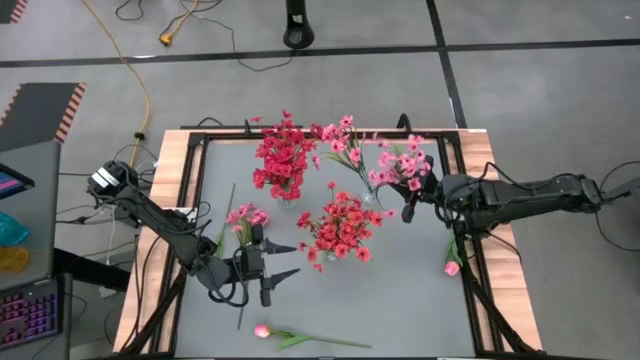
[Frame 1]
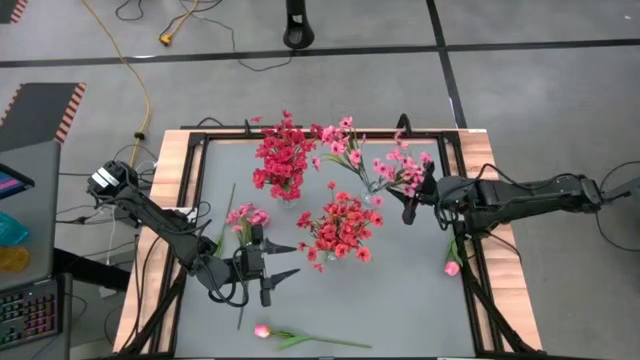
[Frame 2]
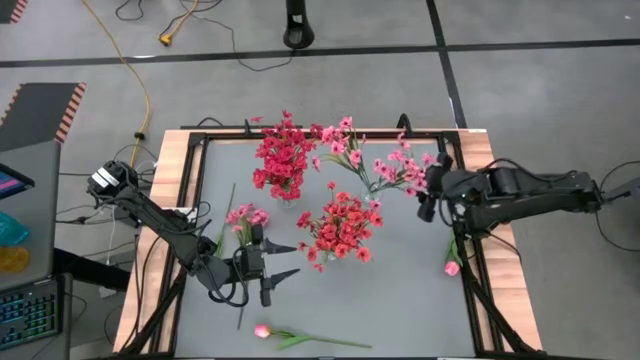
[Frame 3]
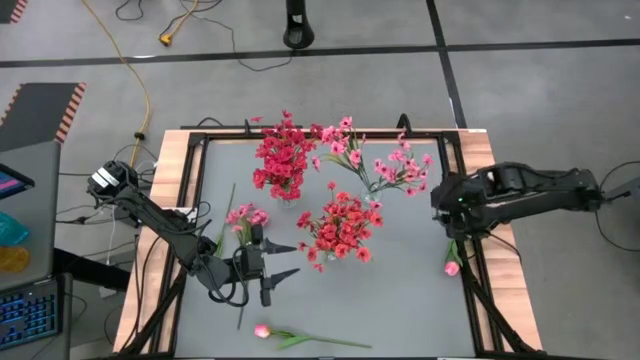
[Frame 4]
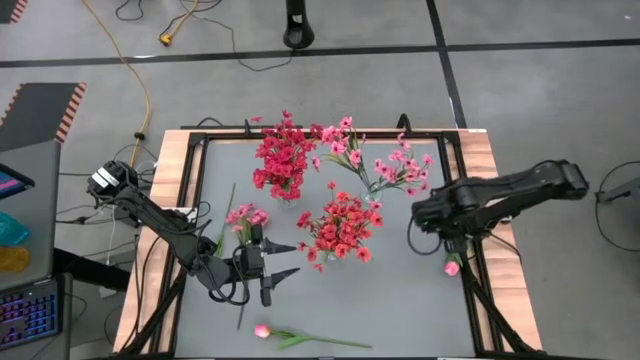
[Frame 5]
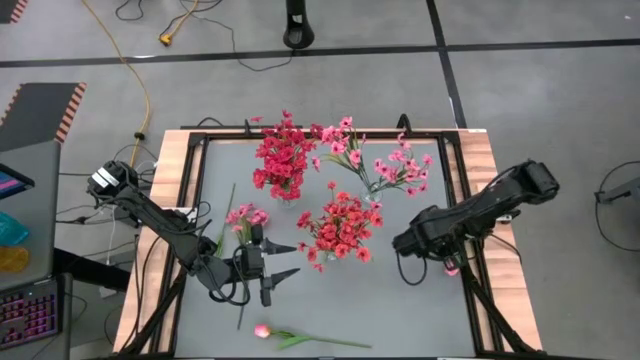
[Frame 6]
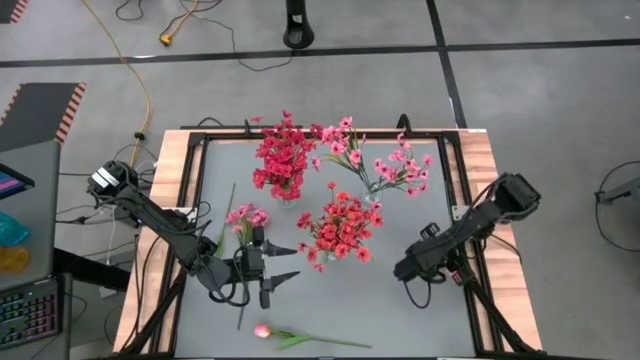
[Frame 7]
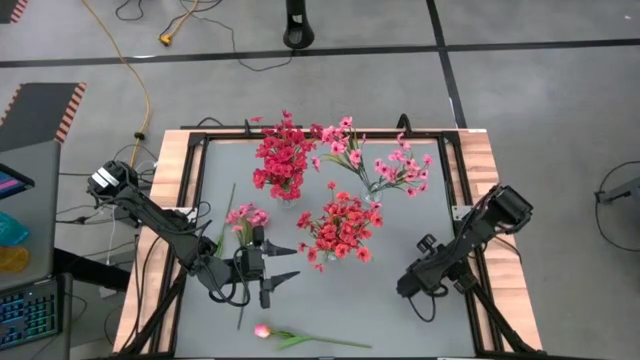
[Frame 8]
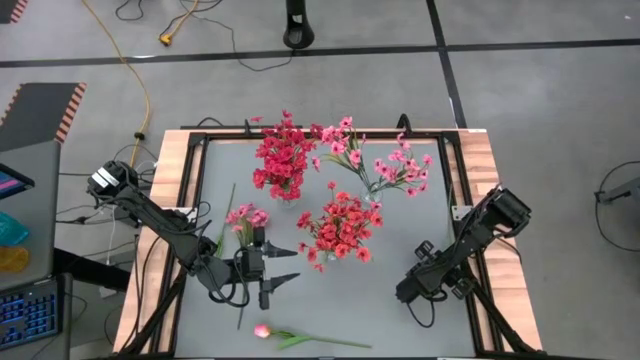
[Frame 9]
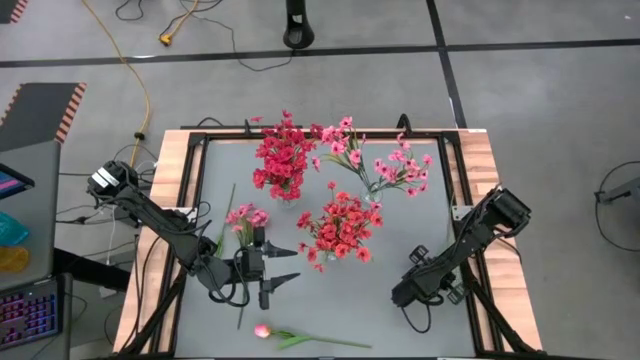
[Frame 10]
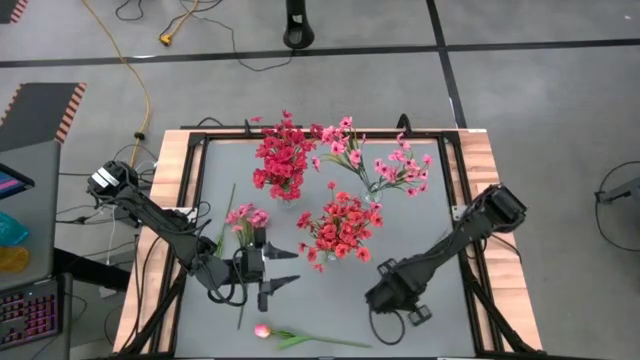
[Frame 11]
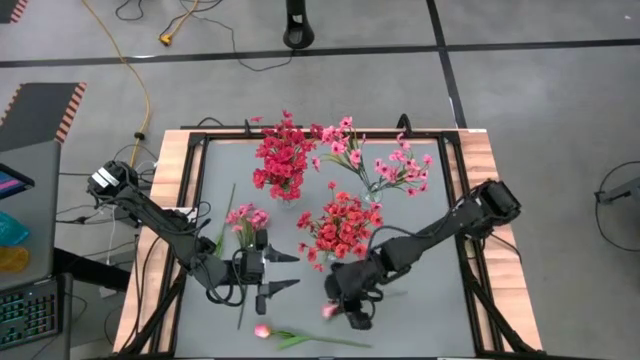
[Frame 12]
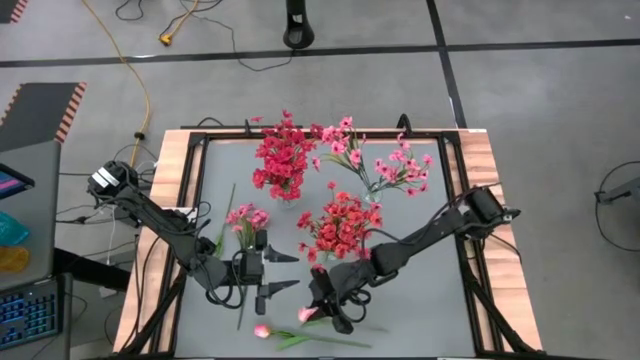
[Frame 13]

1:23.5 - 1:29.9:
Task: Sort flowers into vase by color
Move the pink flowers onto the bottom center table

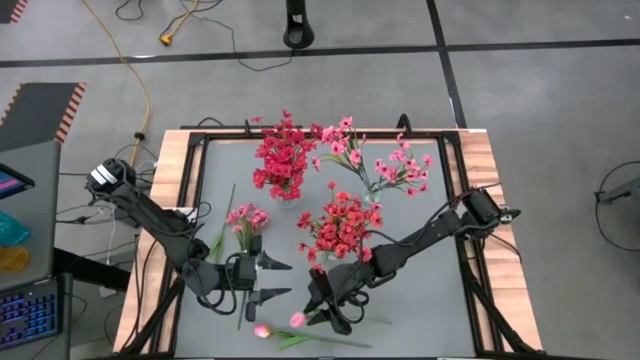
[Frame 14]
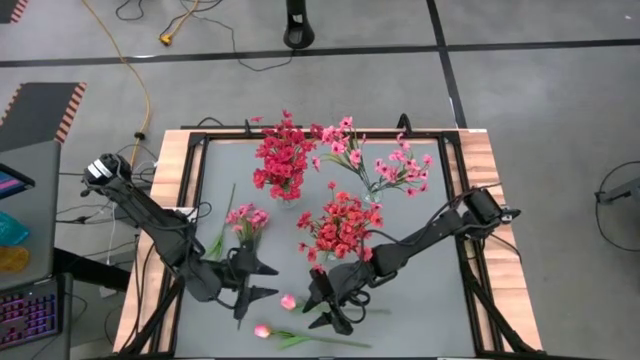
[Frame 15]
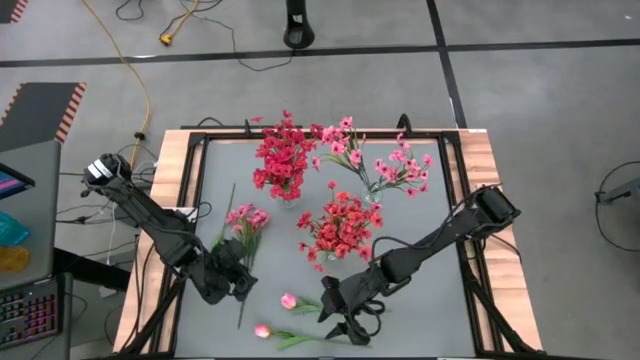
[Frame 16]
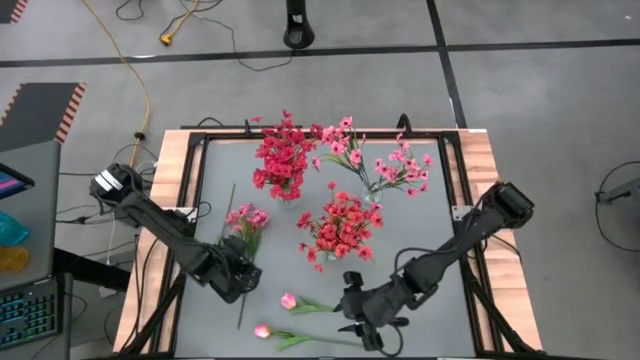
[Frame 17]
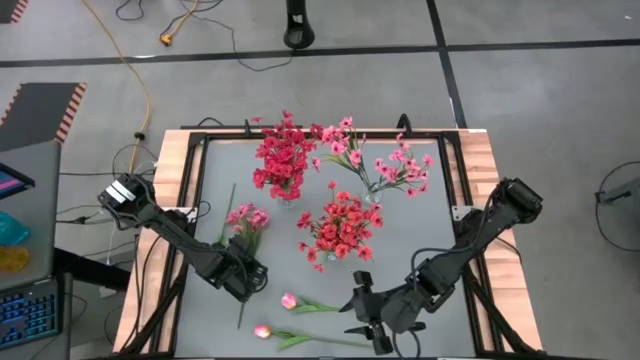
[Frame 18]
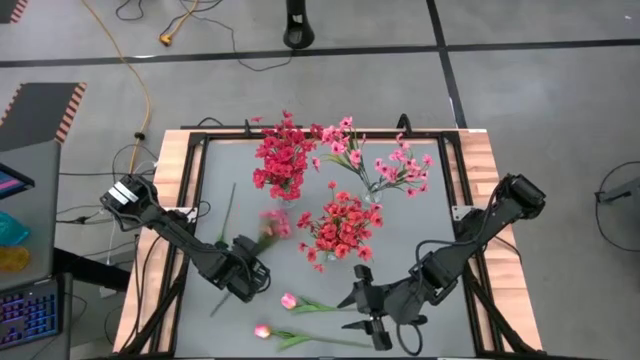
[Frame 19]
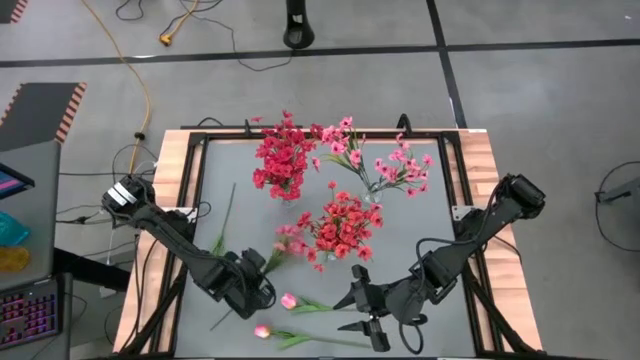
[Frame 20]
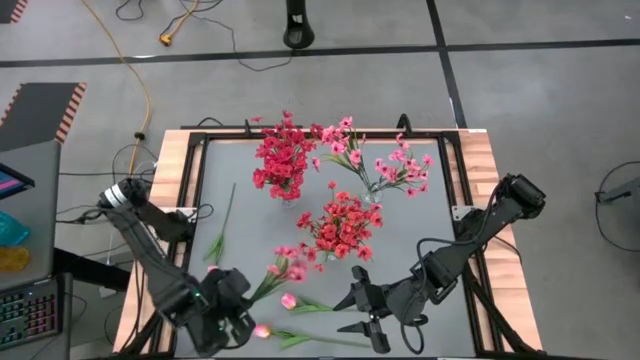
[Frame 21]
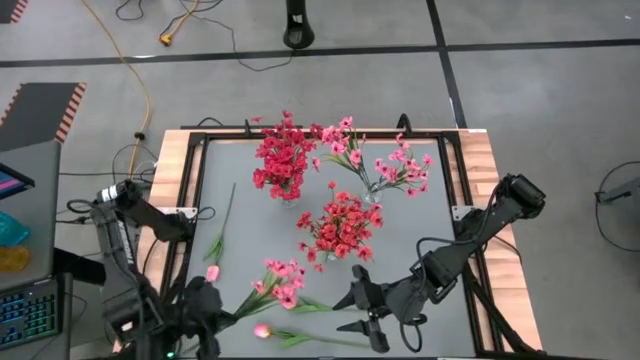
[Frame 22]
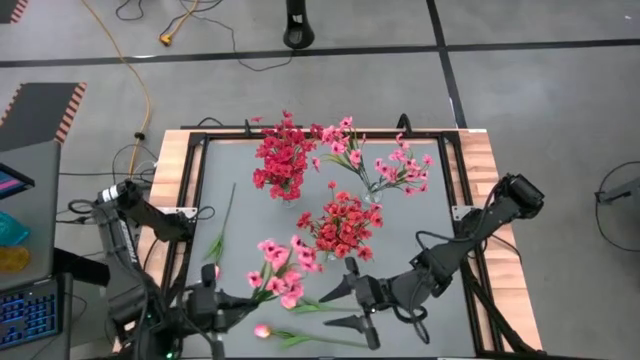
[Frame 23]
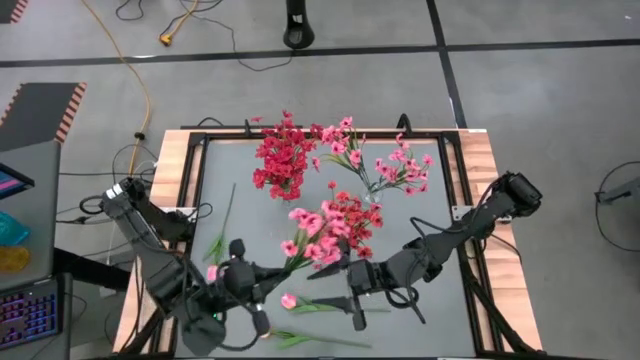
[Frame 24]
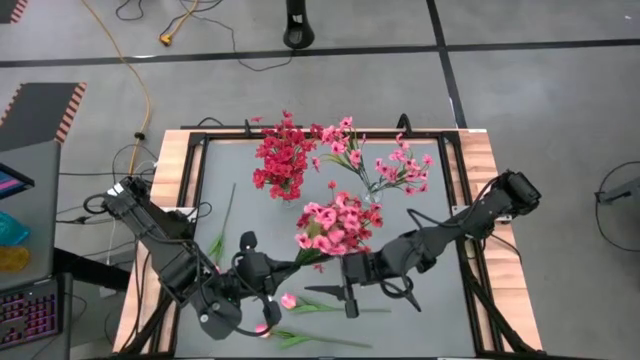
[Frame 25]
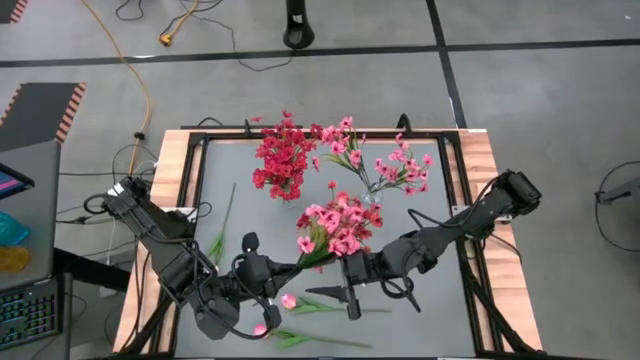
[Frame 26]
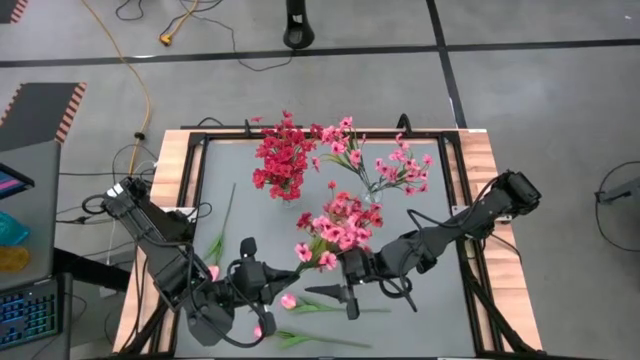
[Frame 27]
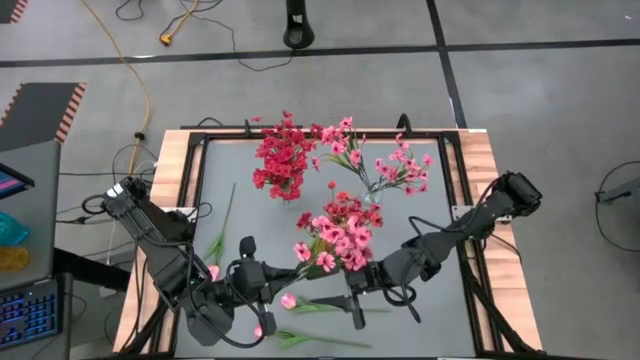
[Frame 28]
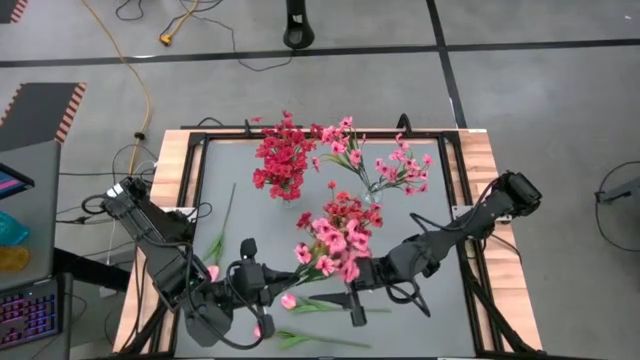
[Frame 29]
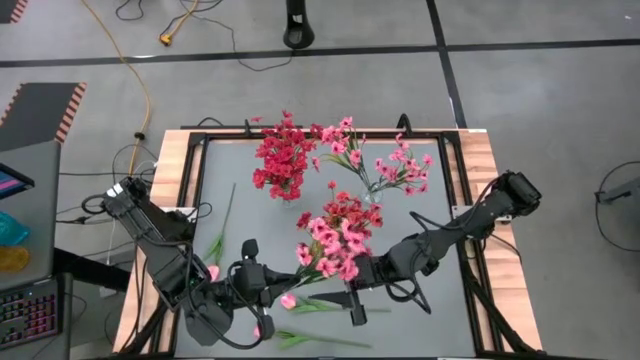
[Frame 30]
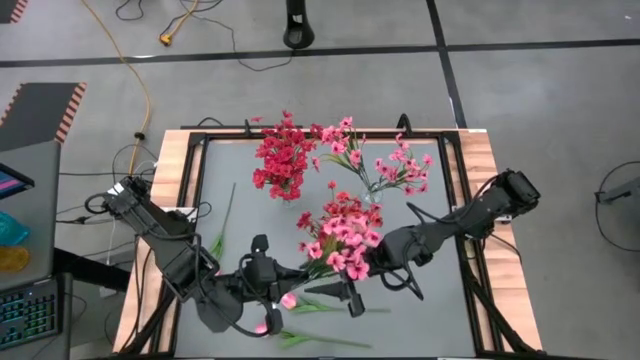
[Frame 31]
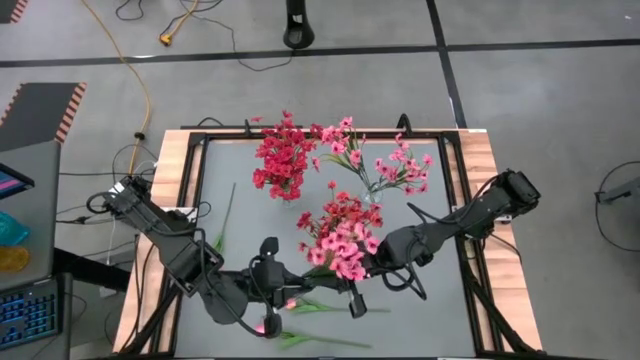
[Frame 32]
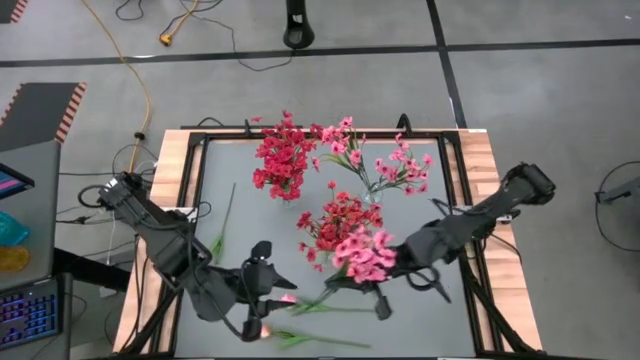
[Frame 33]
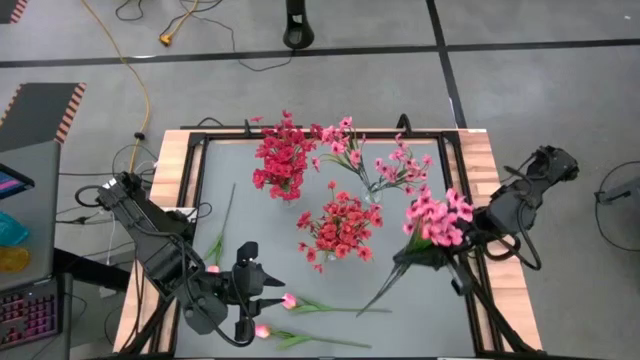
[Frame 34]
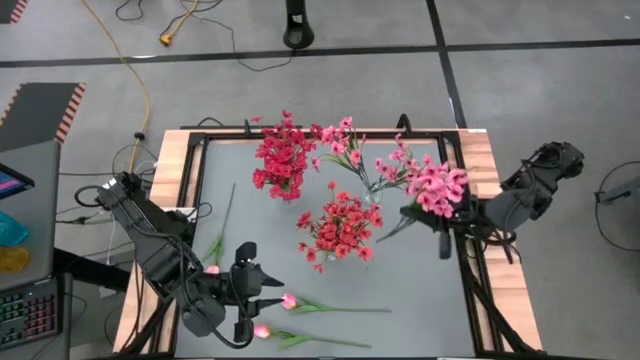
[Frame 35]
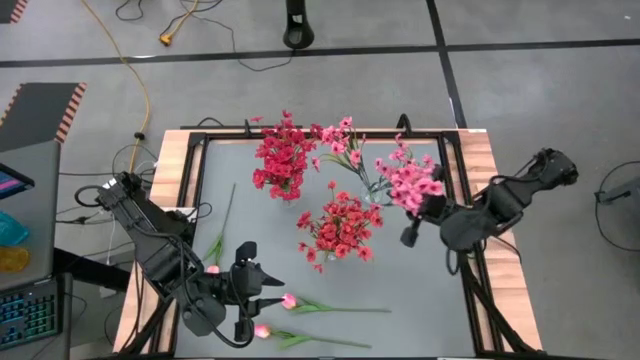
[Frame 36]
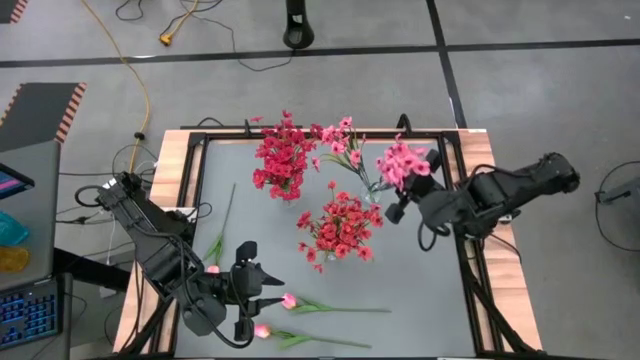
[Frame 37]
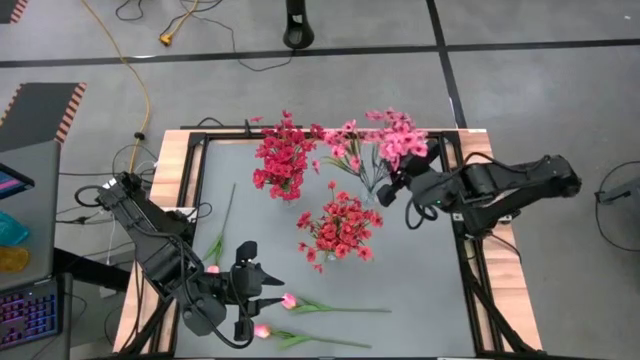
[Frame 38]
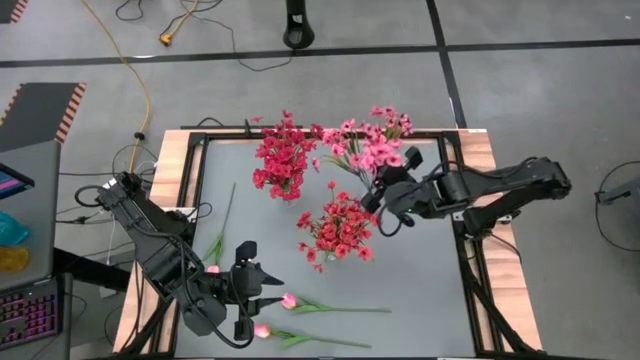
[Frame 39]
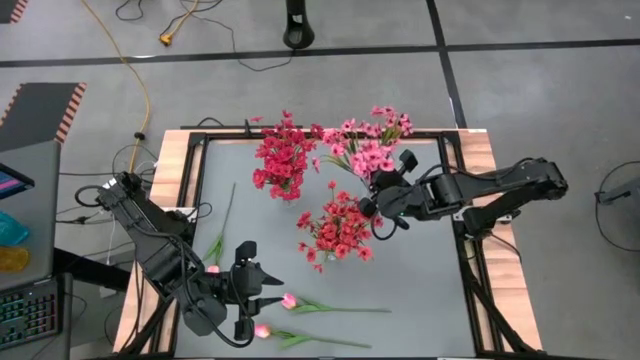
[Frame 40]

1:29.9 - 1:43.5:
Put the pink flowers into the top right transparent vase

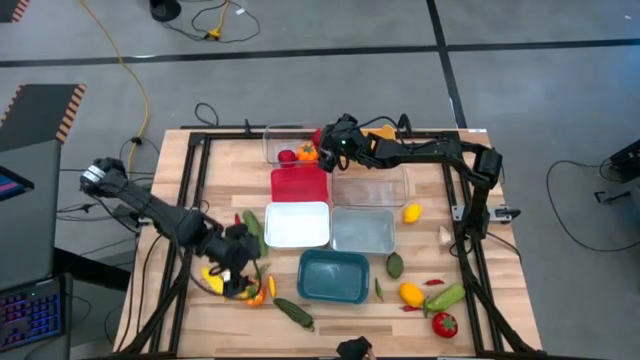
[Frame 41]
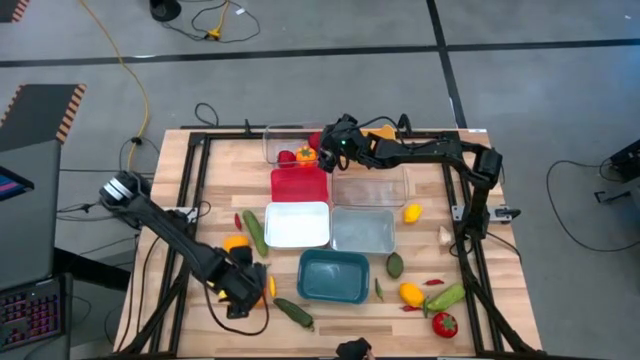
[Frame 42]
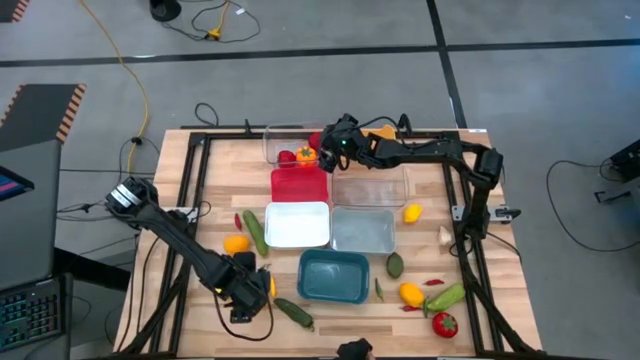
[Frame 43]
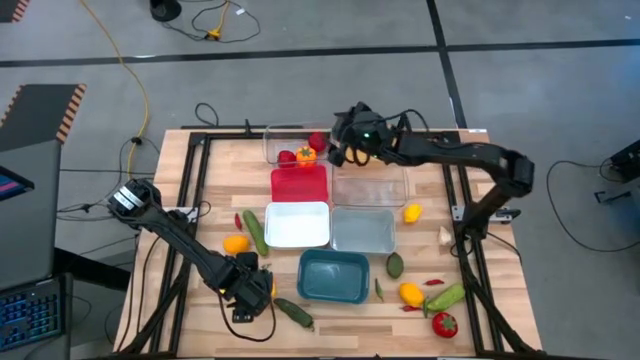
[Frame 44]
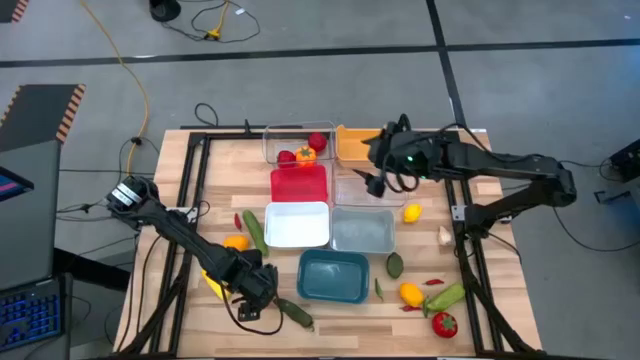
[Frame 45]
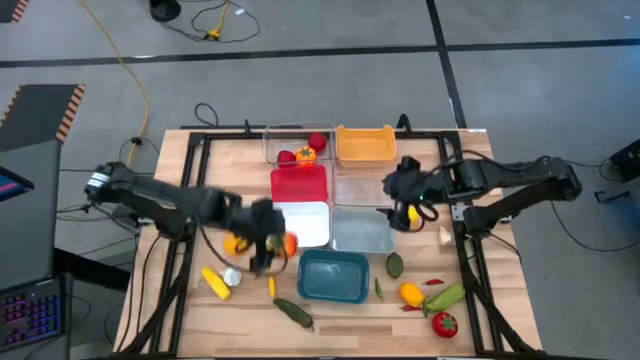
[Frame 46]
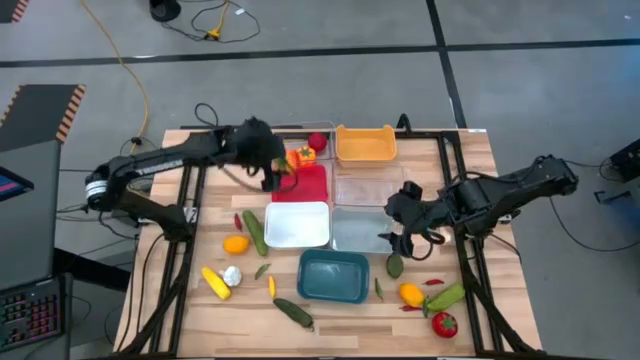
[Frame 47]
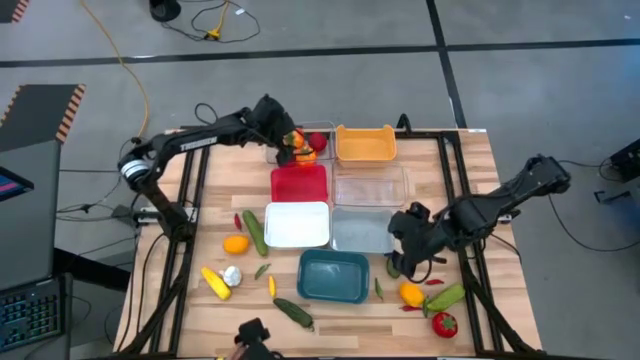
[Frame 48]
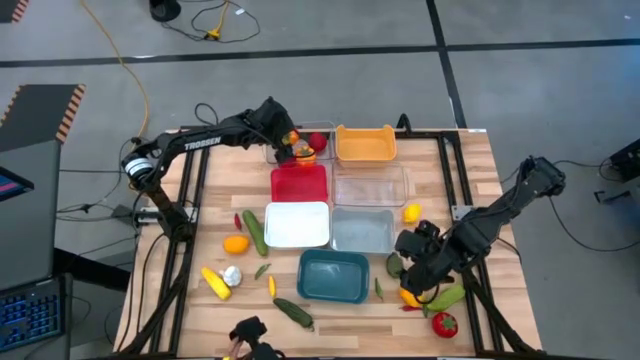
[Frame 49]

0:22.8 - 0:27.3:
Task: Sort produce into baskets
Put the orange tomato into the top transparent bin
